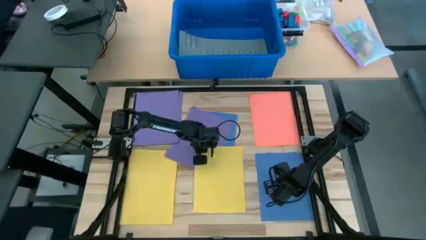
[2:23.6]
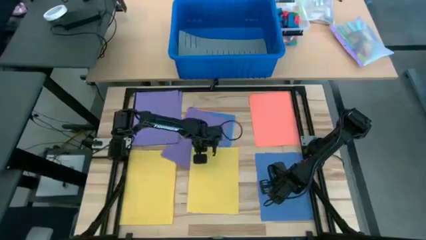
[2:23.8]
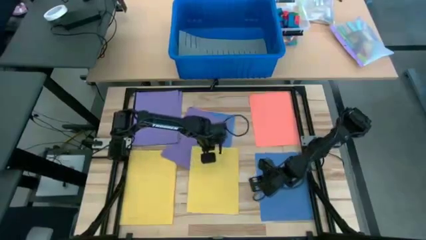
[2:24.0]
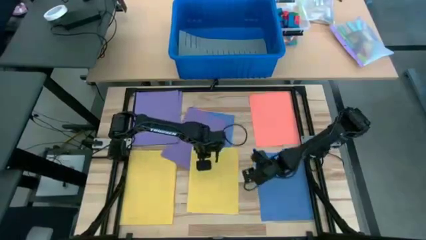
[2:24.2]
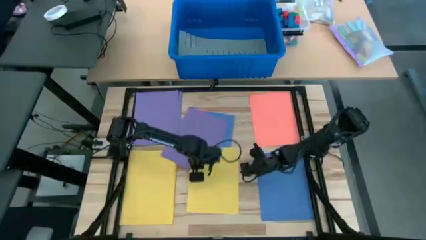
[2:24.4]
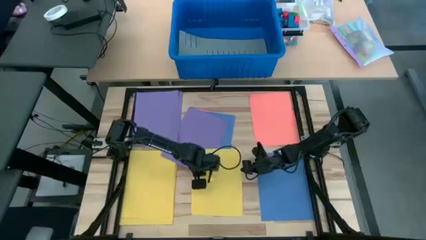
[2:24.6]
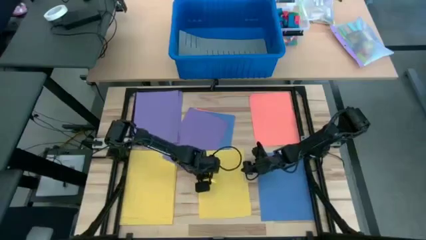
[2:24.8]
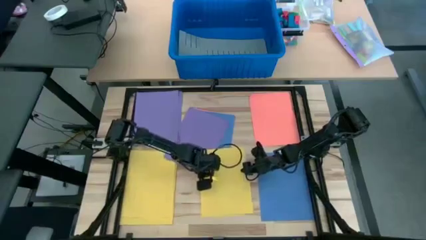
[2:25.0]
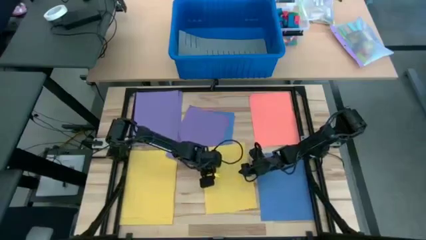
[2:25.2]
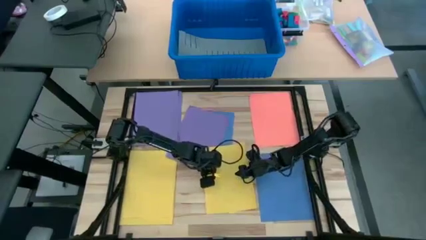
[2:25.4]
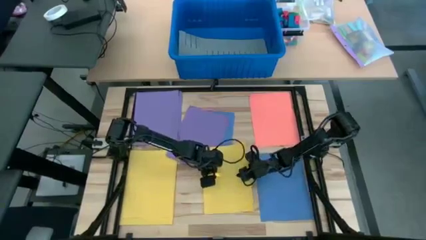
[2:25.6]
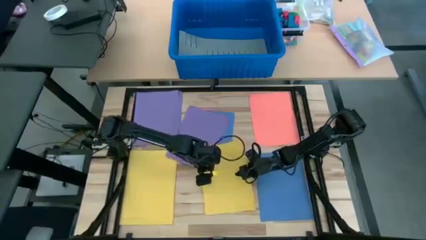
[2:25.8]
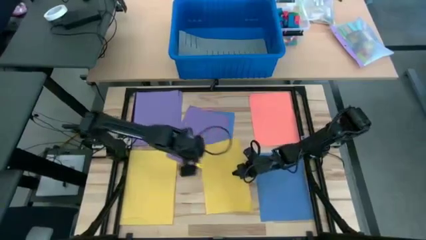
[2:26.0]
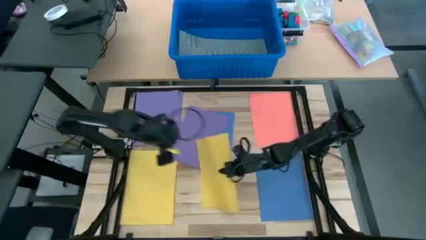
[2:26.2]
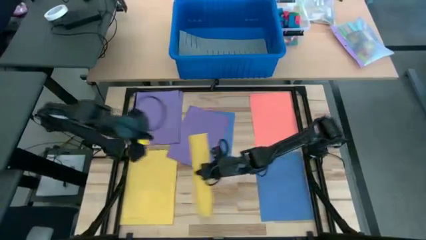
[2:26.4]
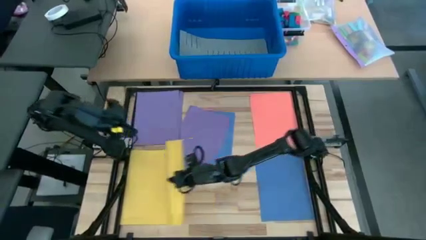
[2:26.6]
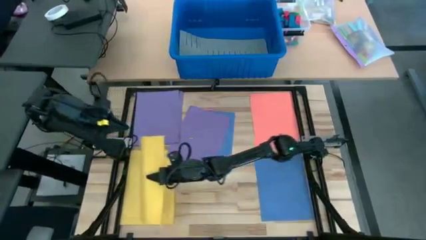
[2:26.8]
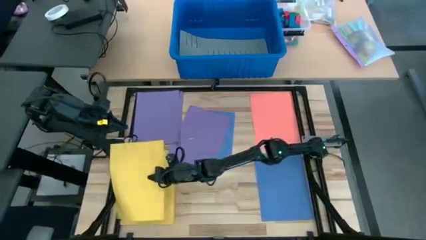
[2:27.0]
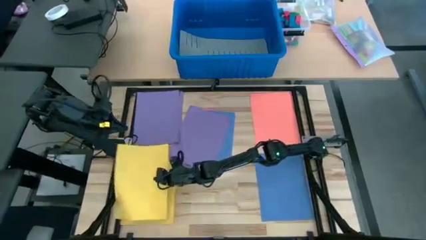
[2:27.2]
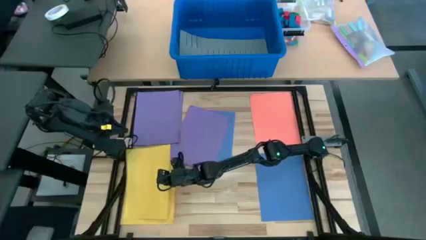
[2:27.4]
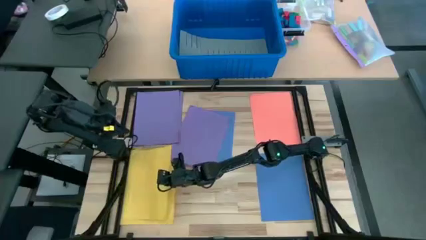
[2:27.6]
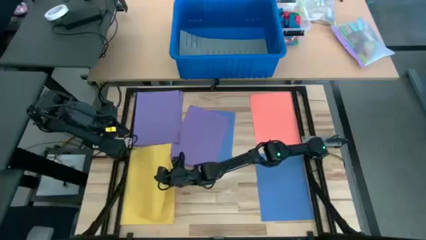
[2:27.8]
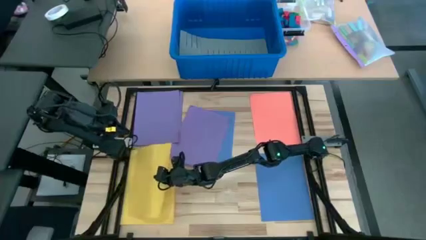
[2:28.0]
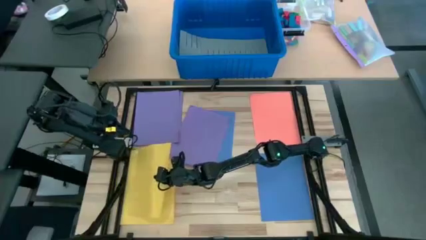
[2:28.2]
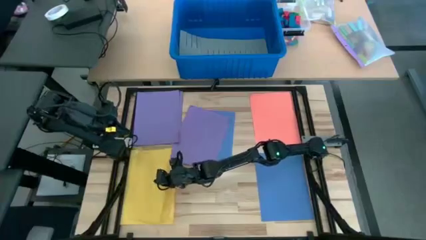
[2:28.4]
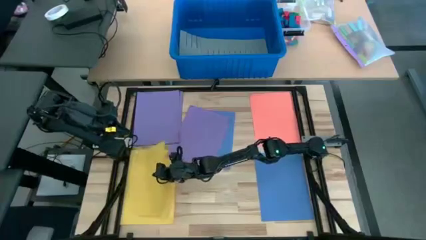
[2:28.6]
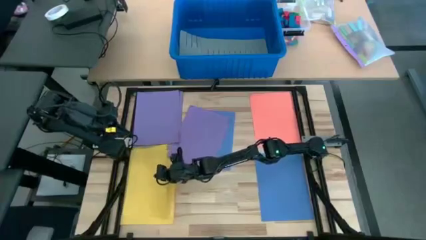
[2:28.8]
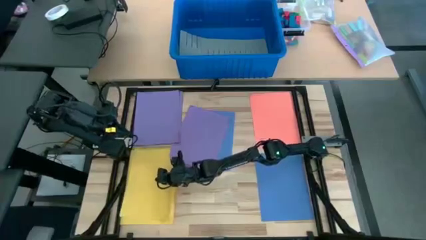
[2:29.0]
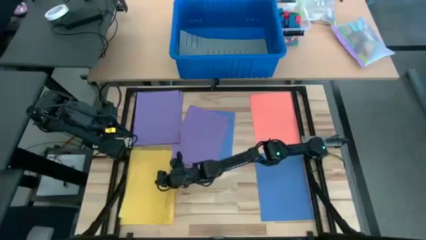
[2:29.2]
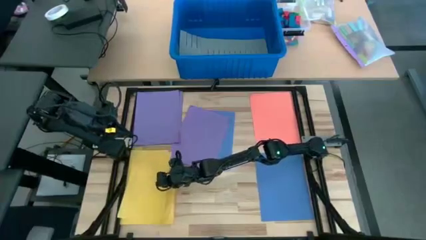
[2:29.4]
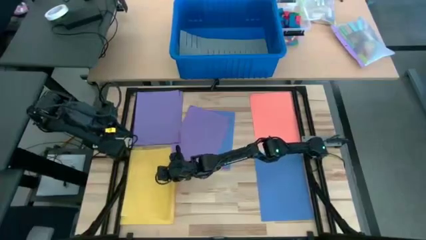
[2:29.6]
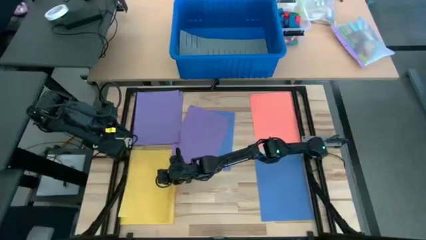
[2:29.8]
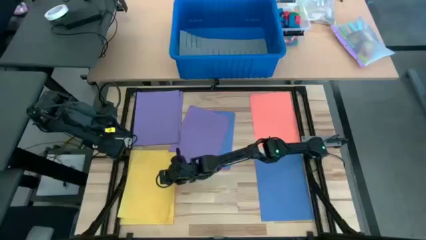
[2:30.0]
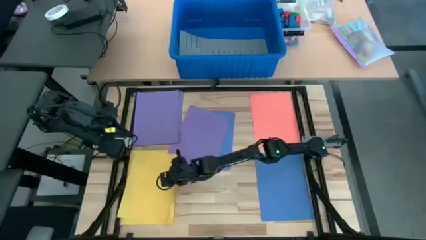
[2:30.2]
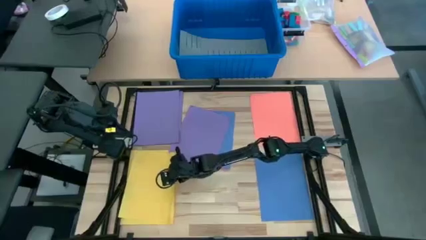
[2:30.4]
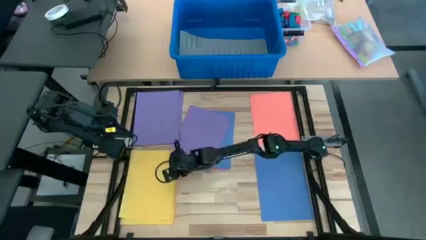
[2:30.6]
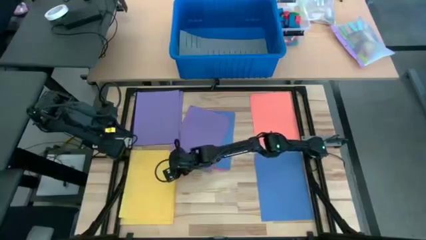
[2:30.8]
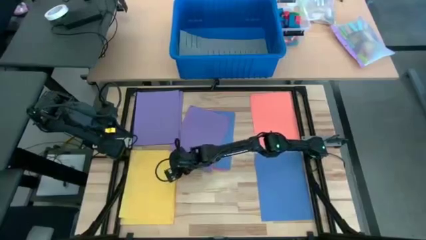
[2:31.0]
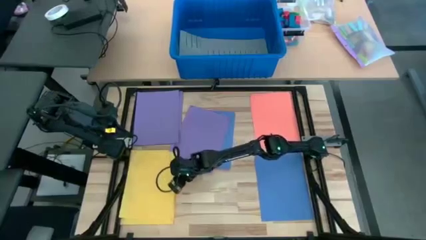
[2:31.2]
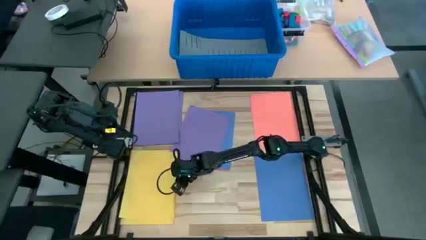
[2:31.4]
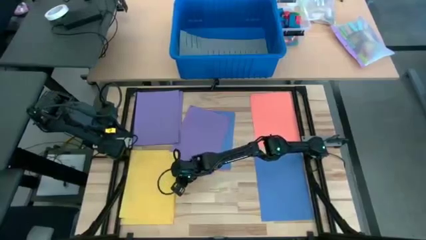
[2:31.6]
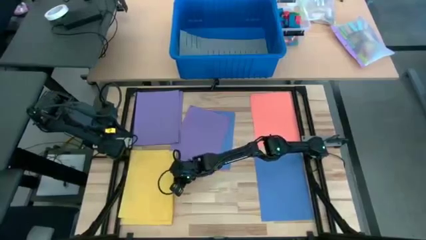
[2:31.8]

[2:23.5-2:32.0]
Task: Organize paper
Stack the yellow colored paper on top of the other yellow colored papers

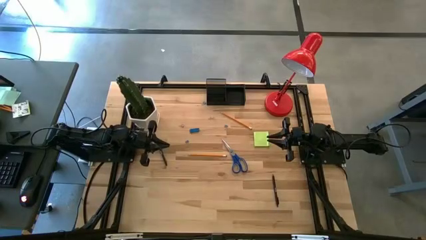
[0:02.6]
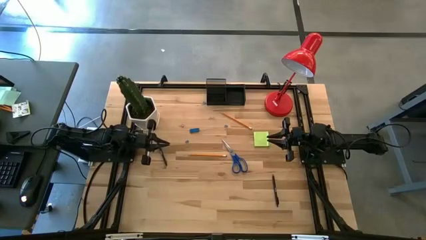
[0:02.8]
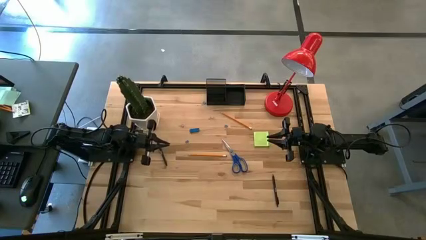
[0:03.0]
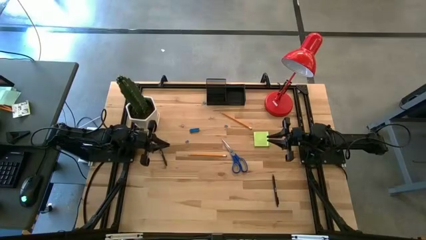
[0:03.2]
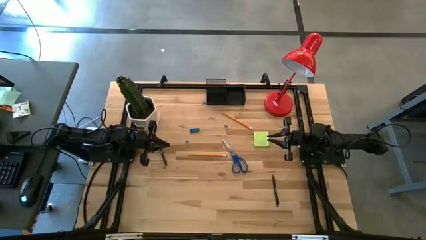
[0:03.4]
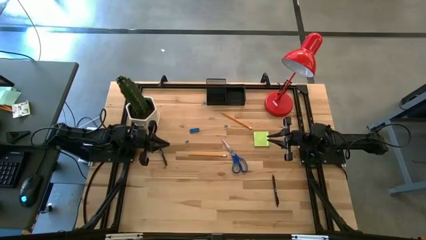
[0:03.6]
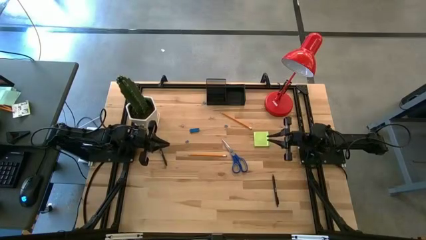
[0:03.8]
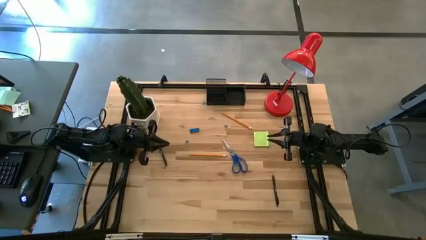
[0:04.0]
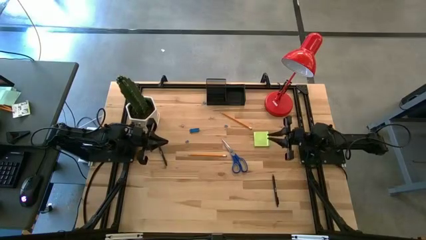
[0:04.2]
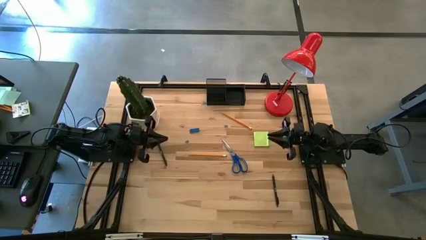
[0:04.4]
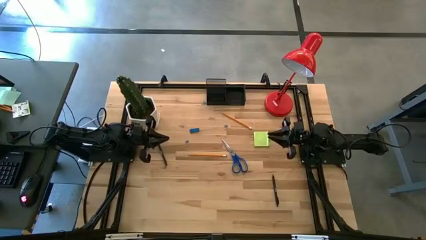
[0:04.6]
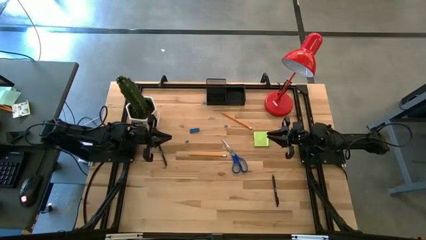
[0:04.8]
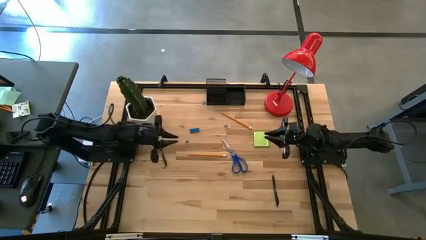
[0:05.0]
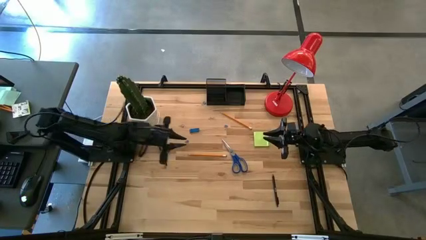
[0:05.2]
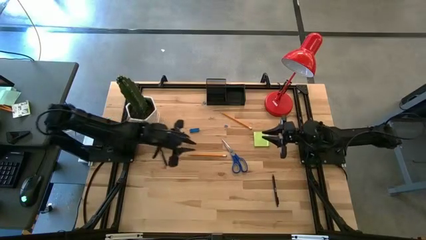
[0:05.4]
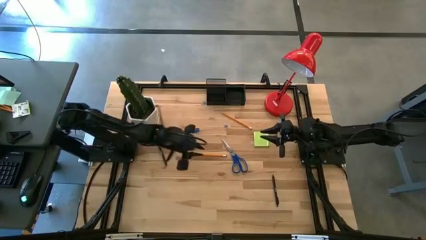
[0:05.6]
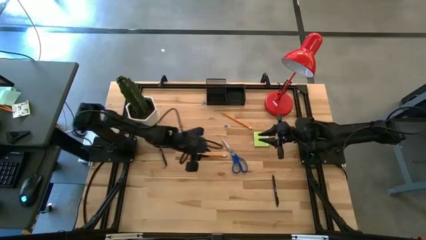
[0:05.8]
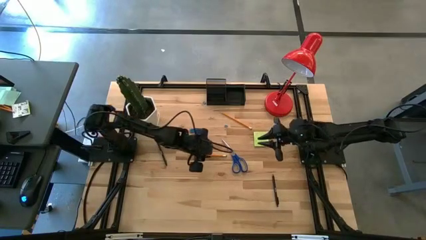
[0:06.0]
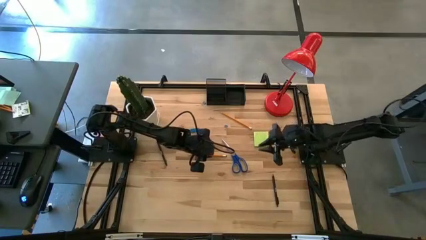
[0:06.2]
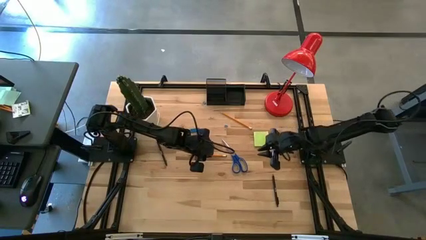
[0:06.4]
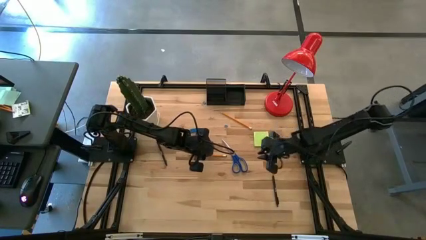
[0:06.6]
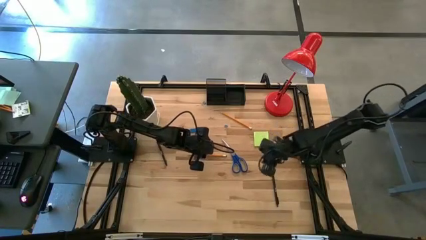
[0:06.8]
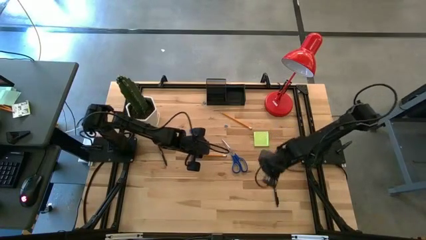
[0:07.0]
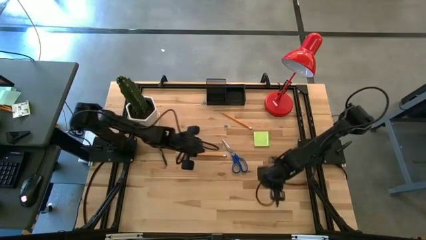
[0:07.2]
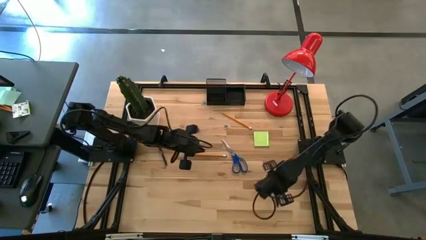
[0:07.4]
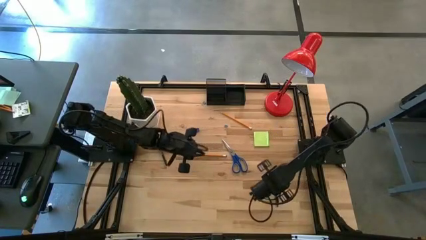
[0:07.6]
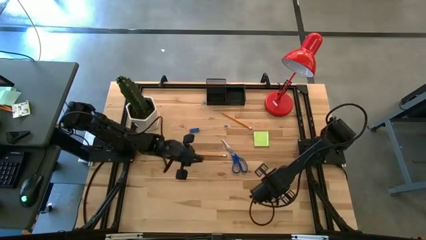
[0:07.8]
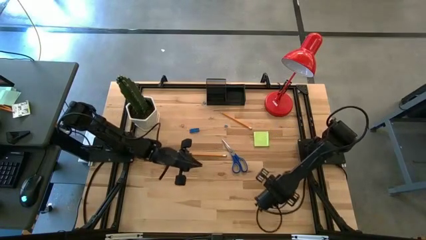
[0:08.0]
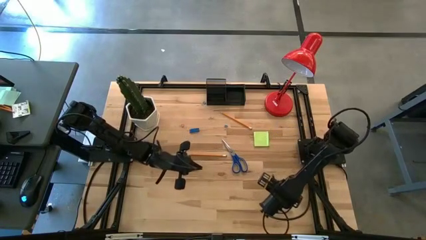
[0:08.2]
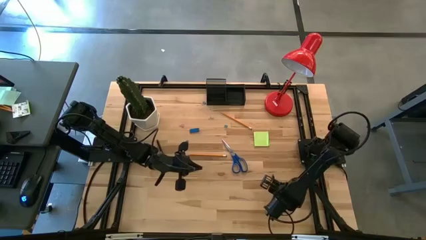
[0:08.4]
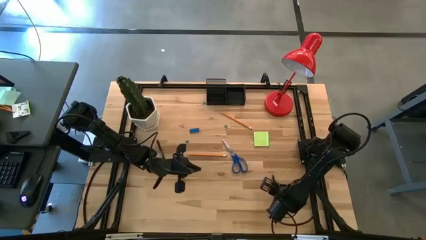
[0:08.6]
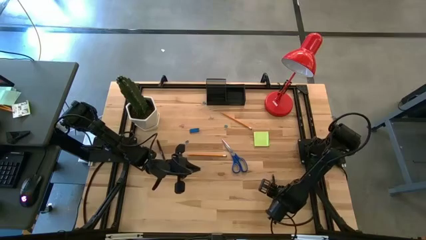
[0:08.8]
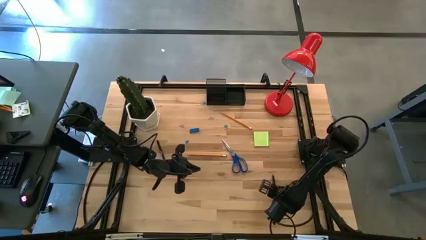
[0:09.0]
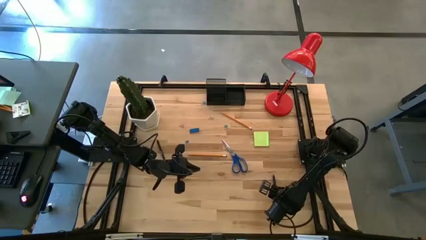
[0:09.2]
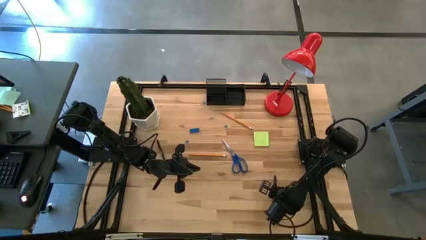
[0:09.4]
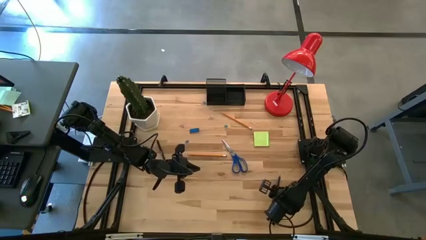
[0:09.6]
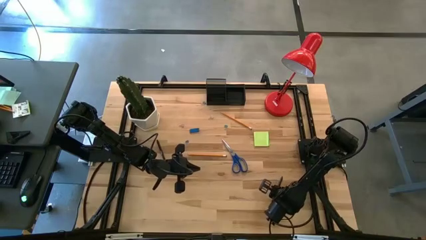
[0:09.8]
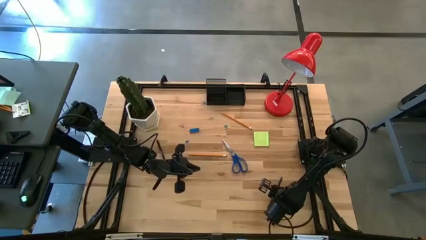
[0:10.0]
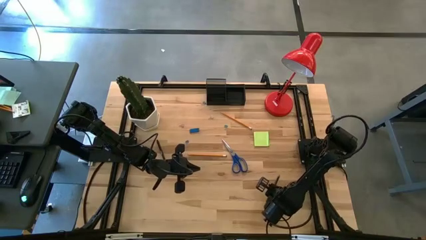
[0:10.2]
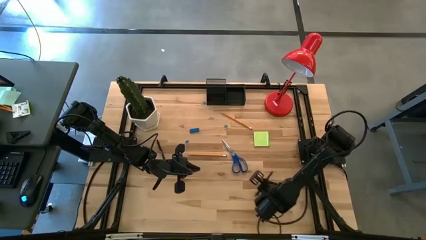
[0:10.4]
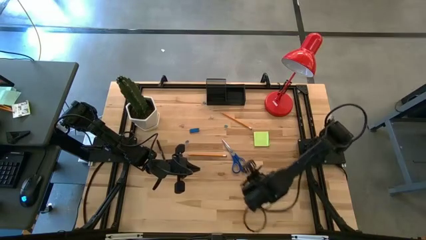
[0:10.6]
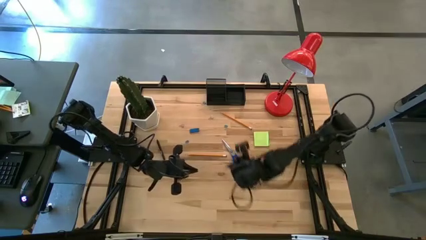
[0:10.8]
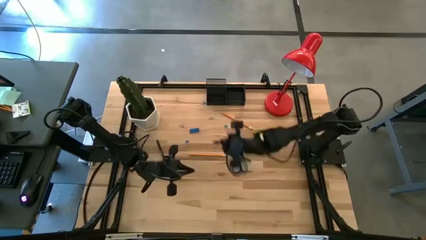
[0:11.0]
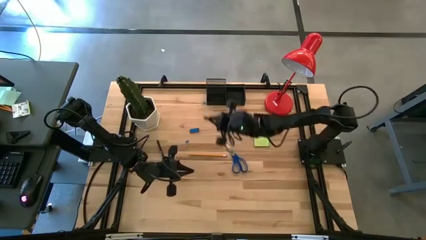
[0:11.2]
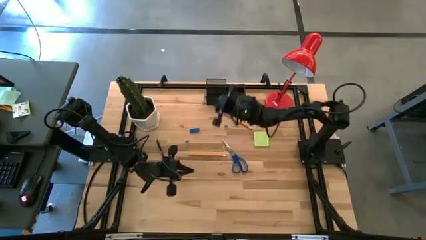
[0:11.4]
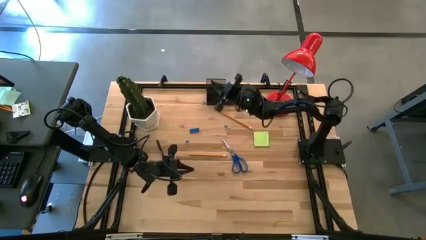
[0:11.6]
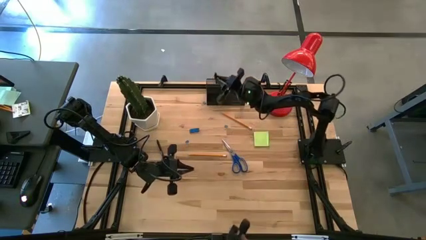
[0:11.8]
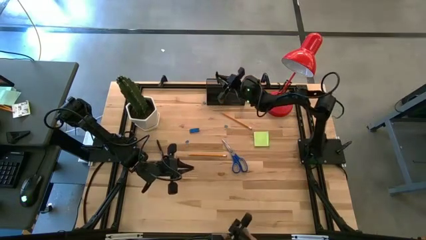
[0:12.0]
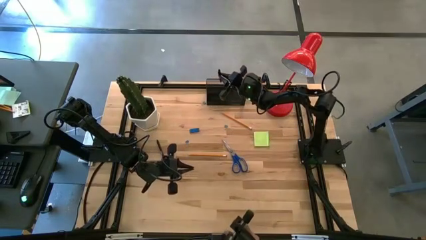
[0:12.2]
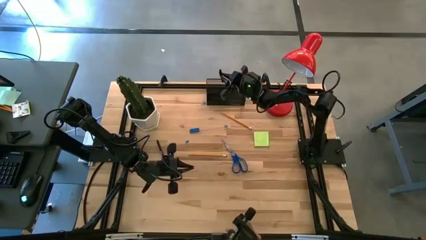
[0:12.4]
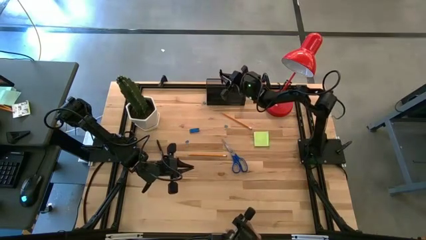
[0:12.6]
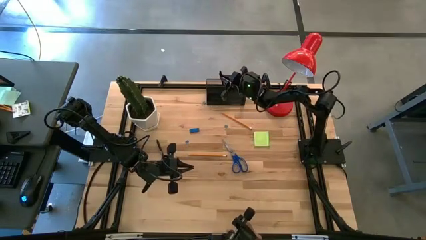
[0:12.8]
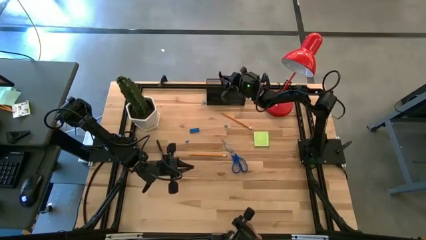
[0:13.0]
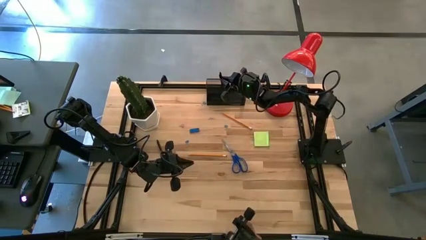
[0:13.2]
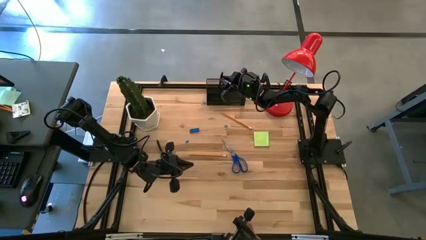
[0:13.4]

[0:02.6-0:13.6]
Task: Pick and place office supplies into organizer
Put the right black pen into the top left section of the desk organizer
